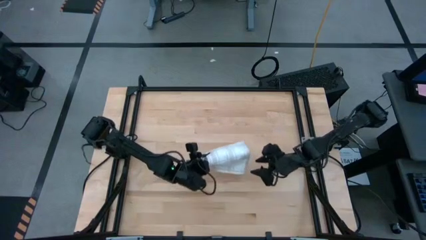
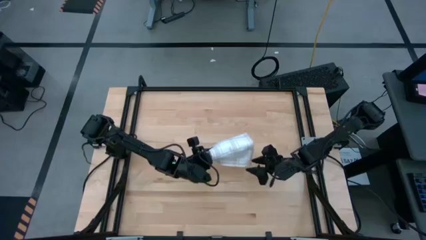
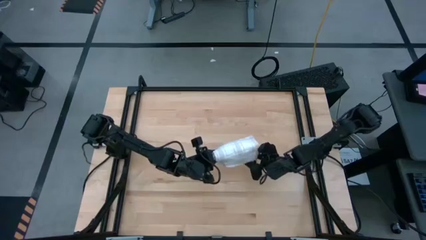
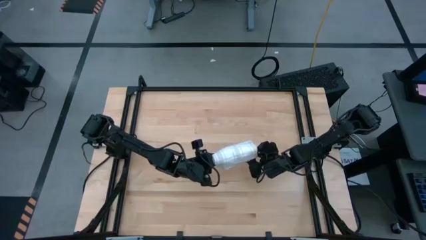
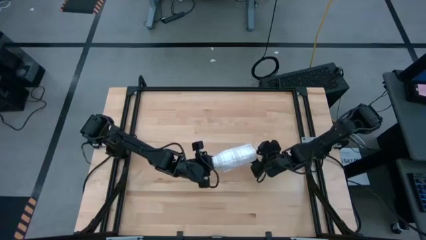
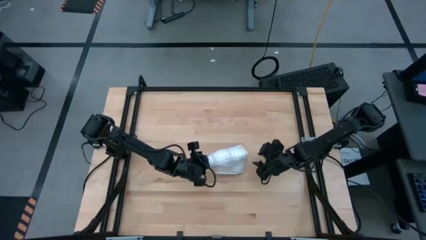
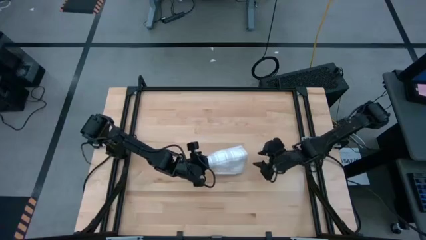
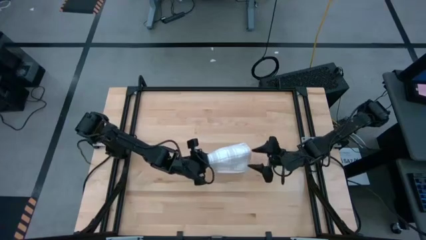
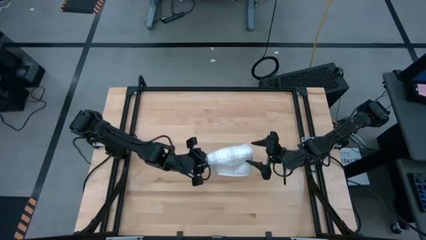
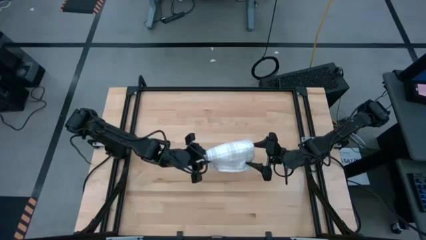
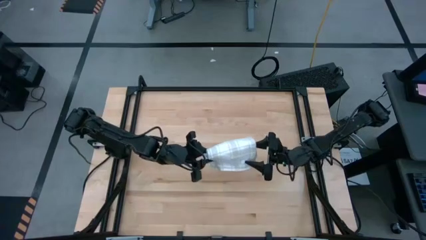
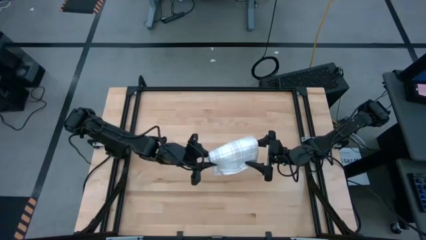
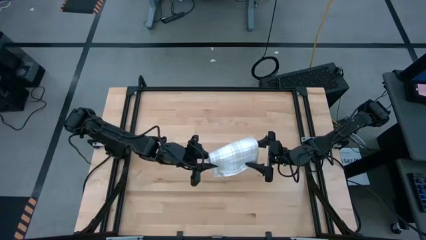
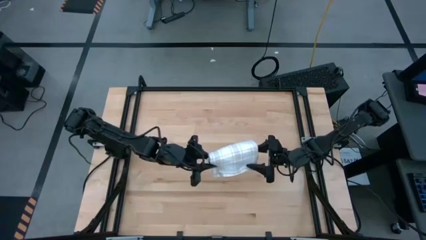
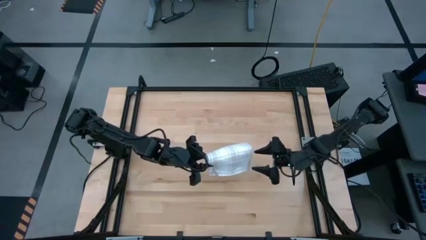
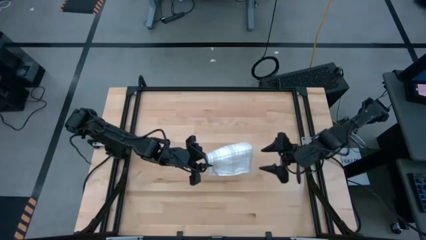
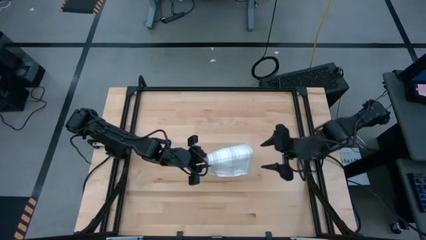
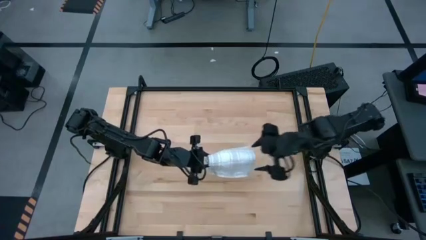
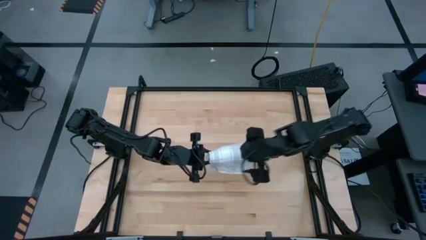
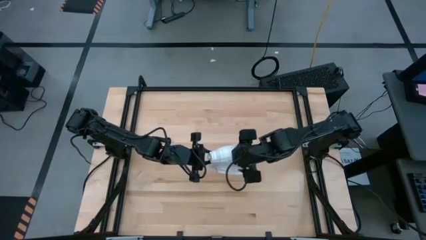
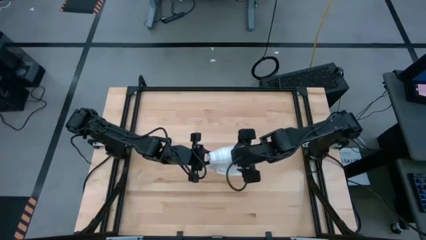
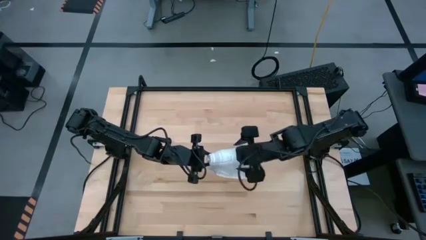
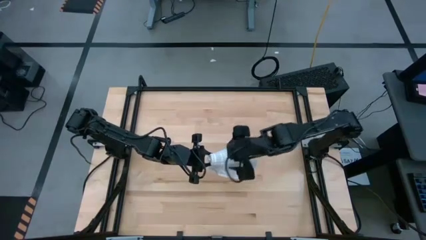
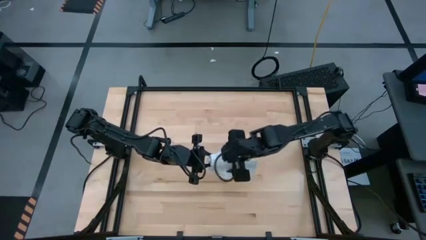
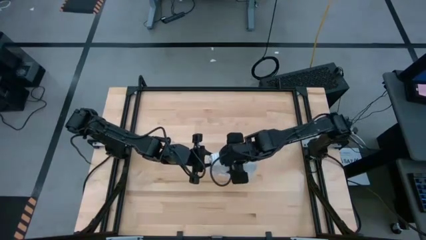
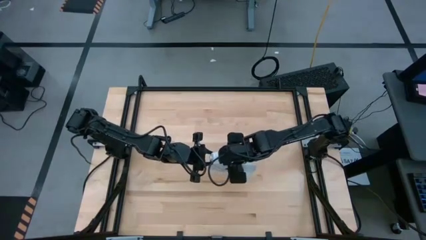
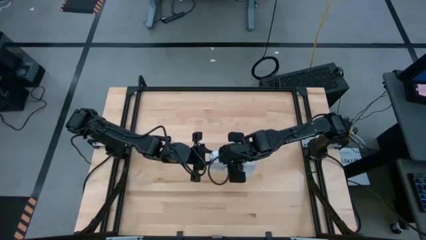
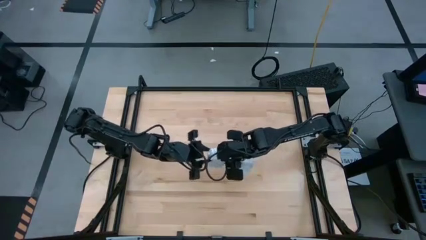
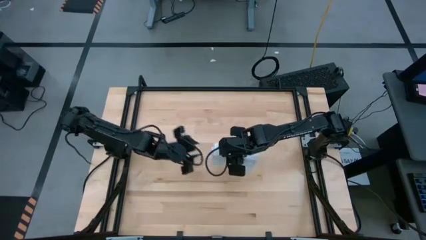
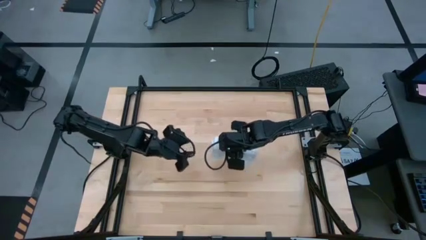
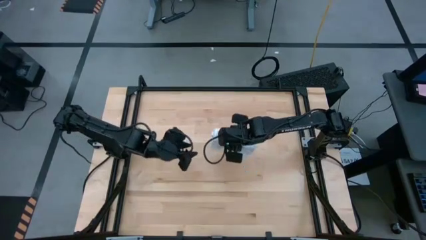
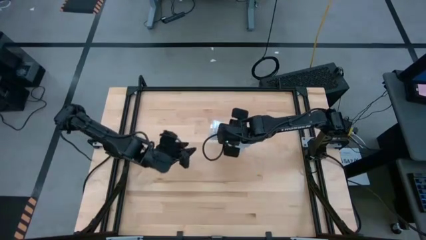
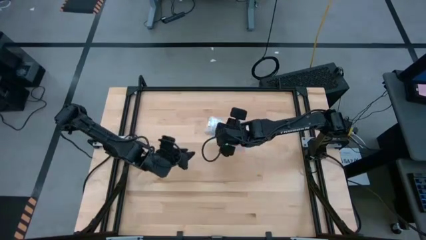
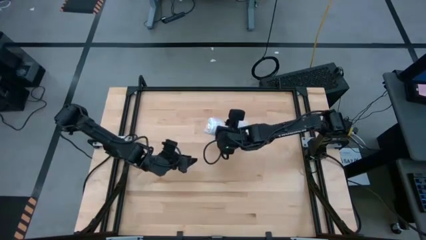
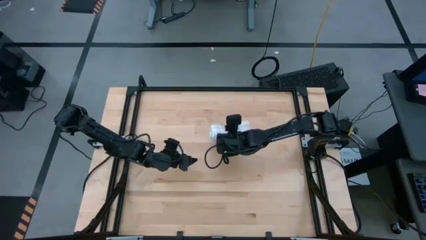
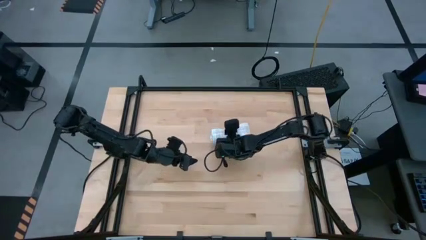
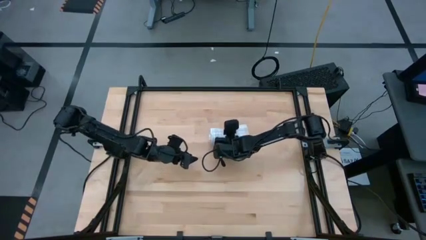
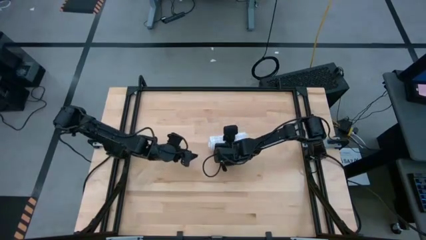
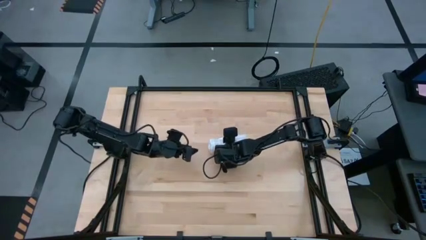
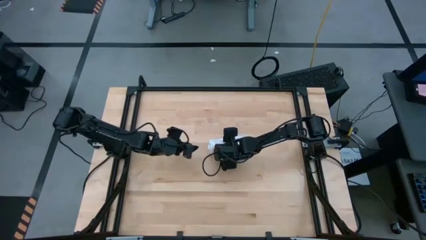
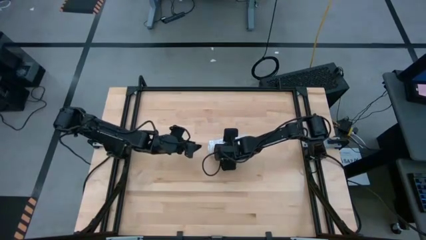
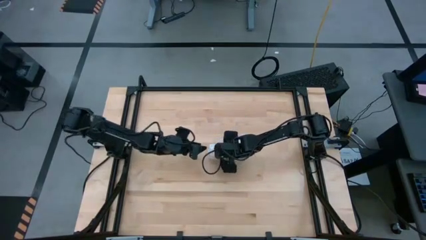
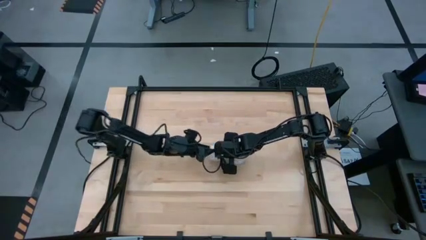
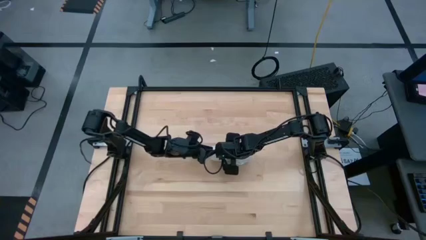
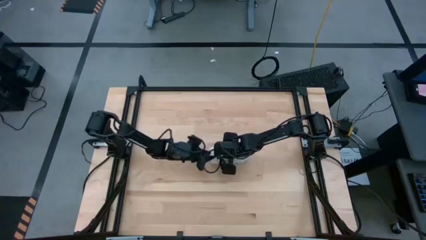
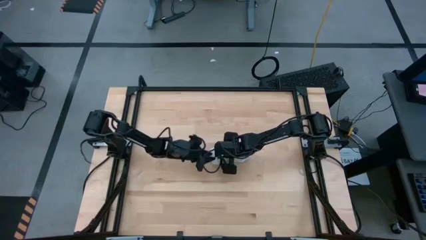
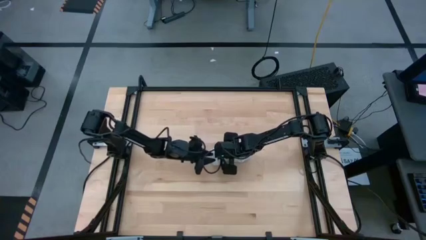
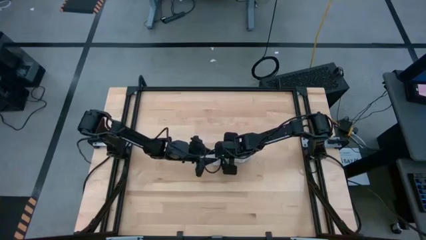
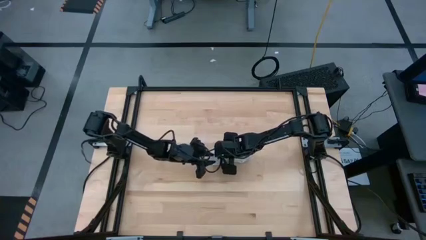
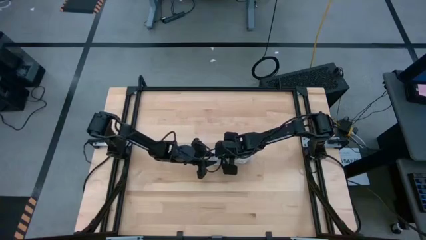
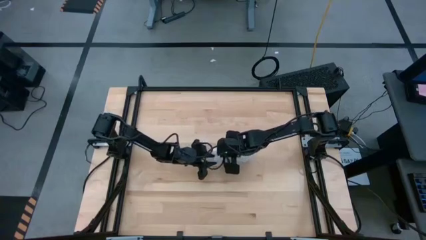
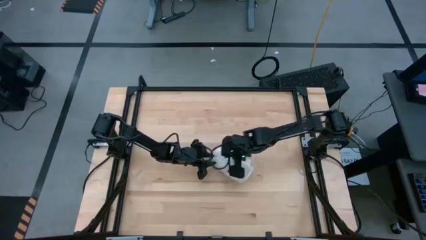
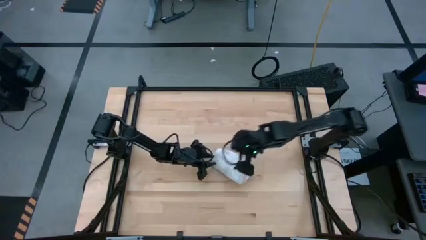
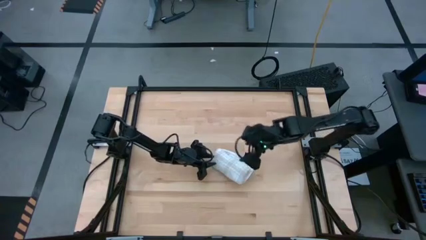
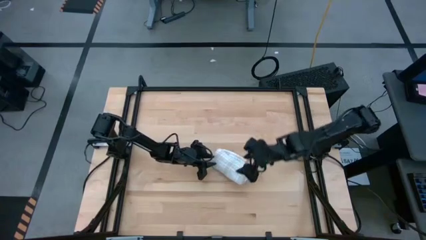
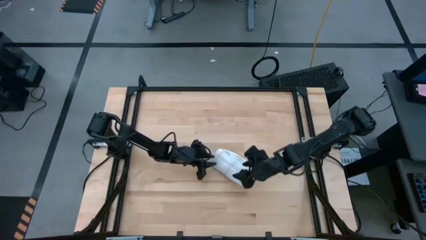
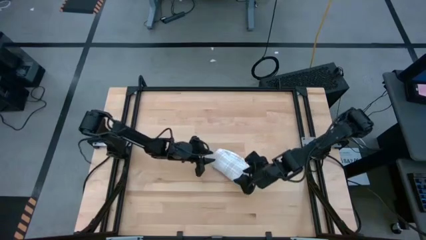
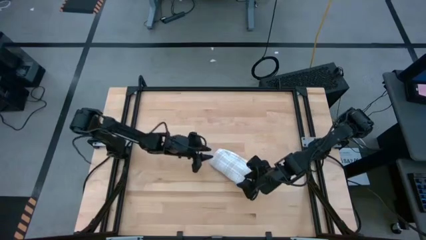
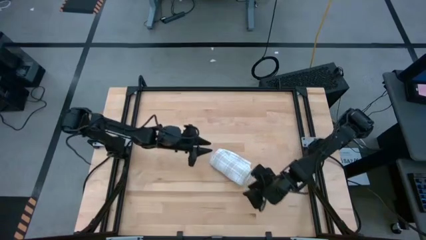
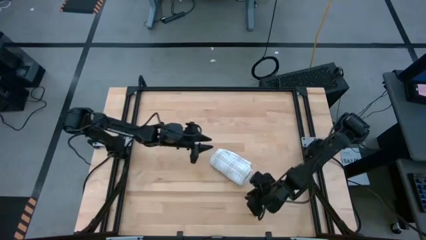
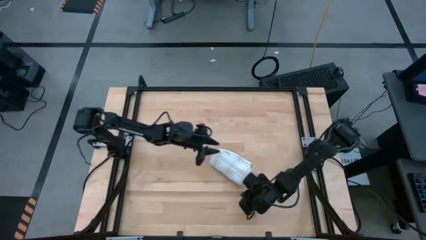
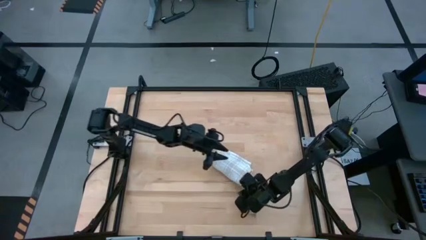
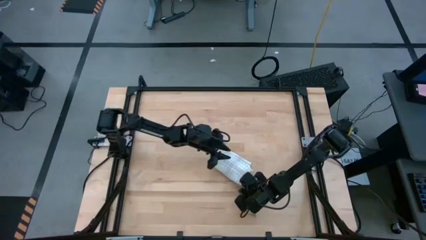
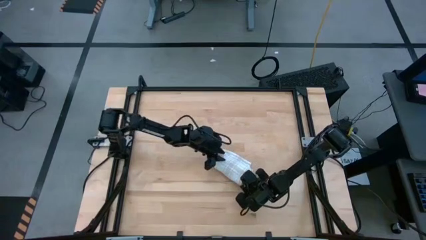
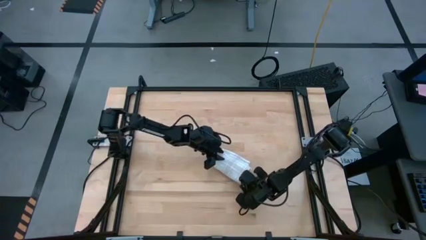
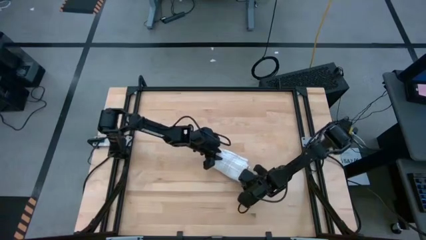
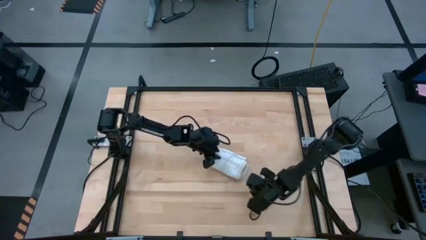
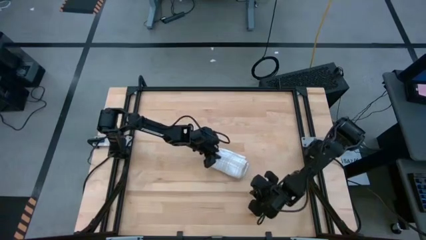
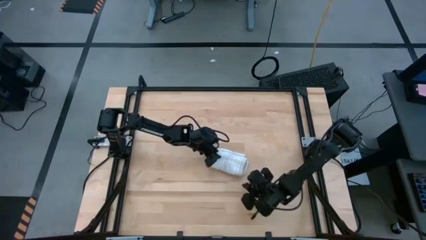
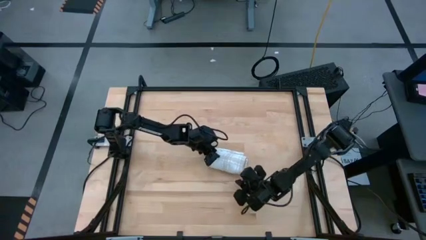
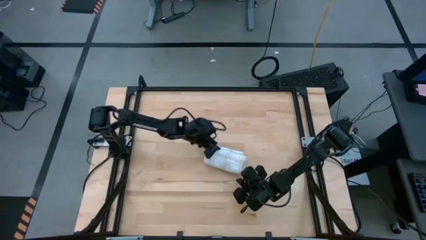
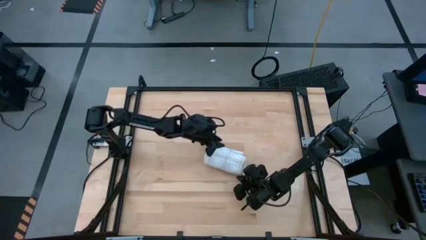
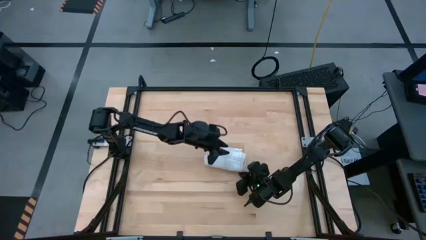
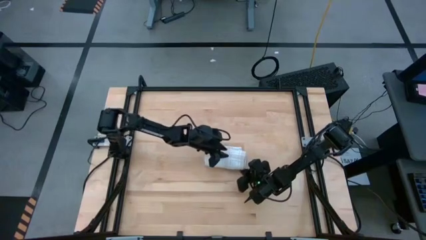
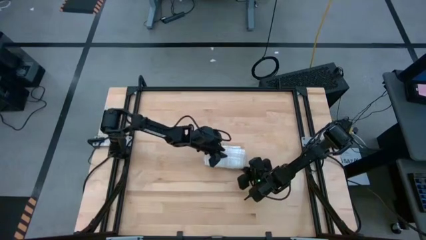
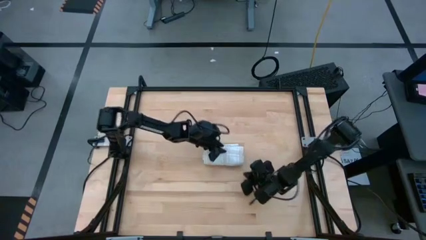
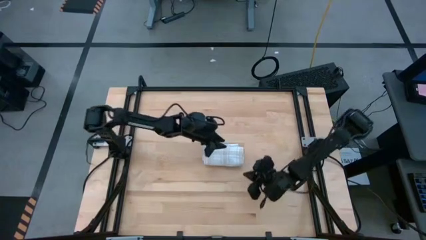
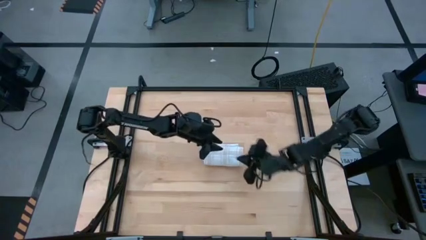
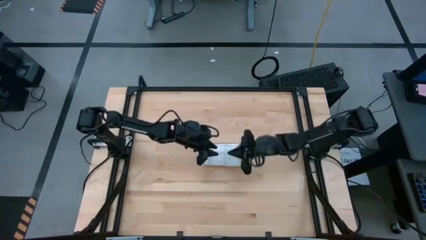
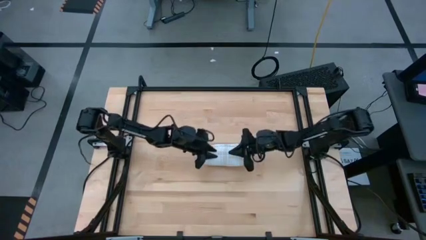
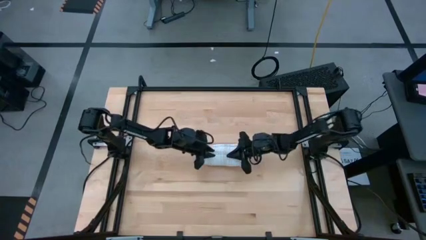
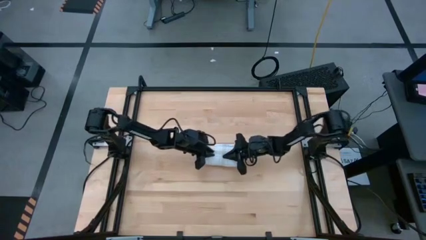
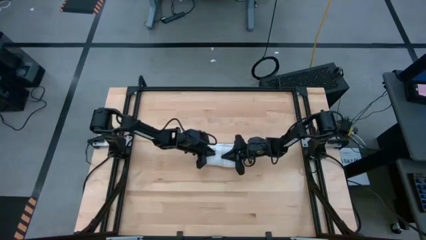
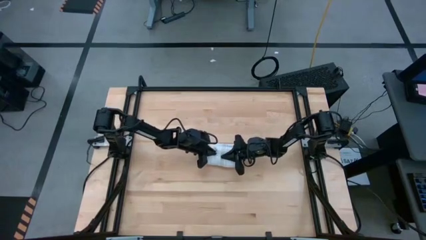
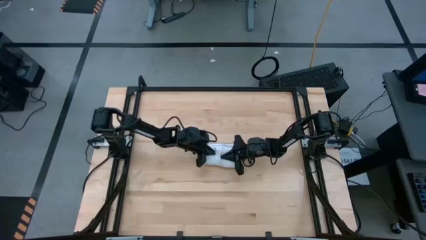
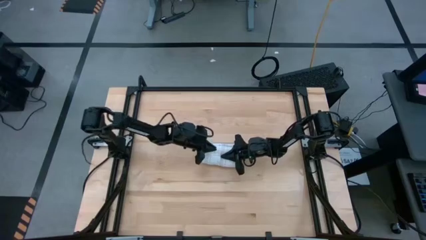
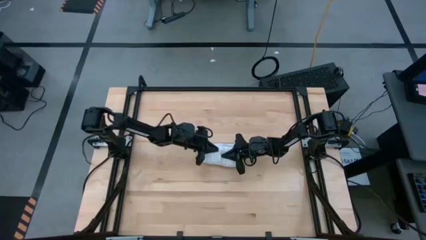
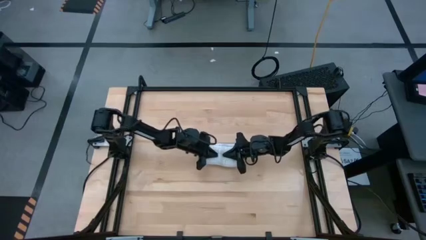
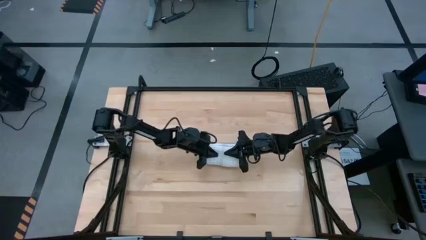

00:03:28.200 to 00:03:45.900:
Task: Roll towel
Roll the towel
